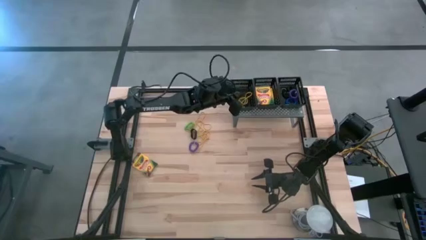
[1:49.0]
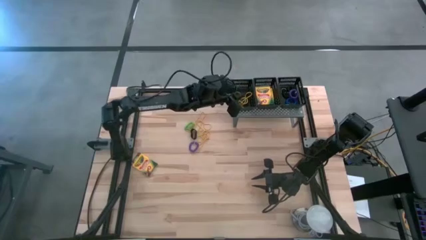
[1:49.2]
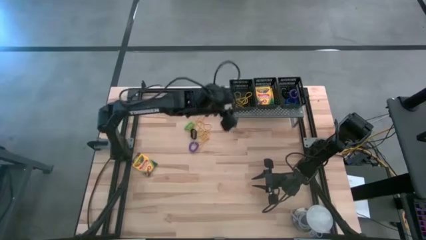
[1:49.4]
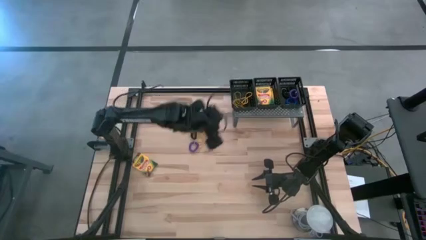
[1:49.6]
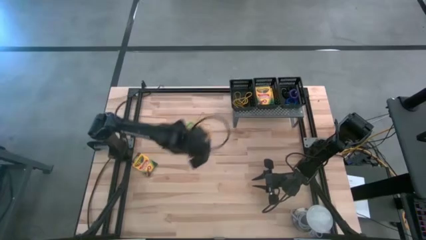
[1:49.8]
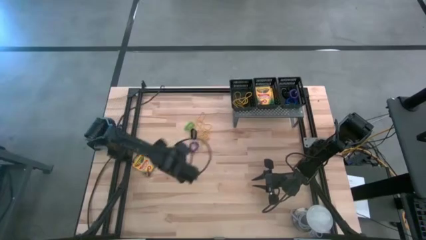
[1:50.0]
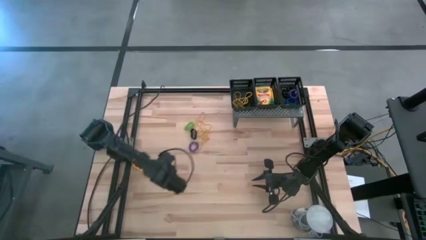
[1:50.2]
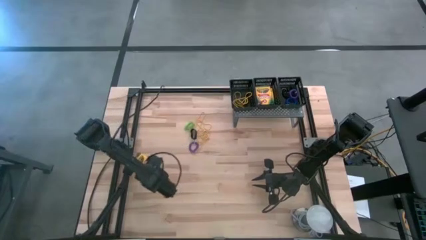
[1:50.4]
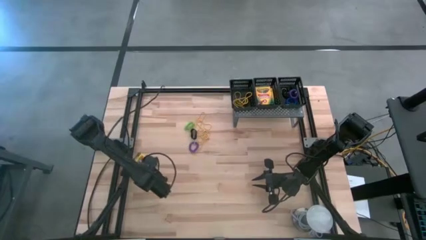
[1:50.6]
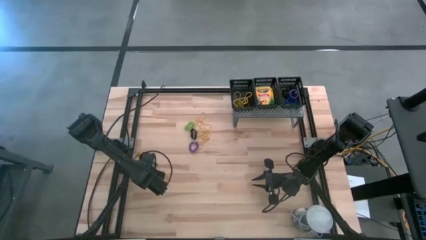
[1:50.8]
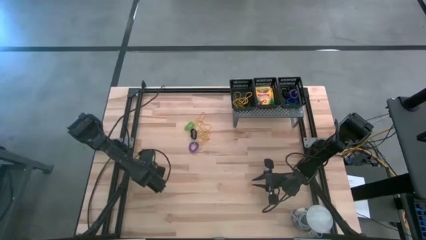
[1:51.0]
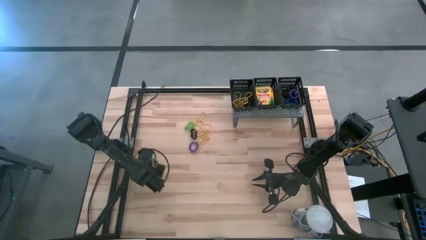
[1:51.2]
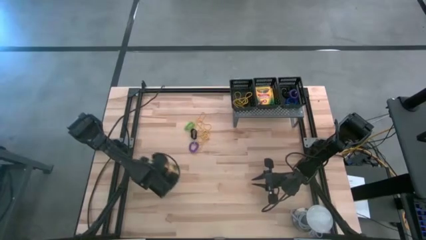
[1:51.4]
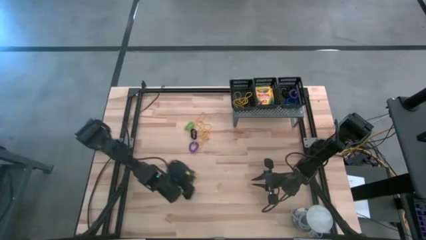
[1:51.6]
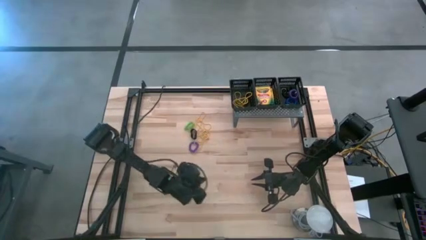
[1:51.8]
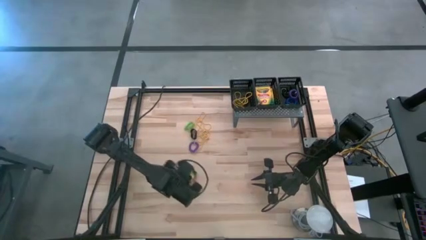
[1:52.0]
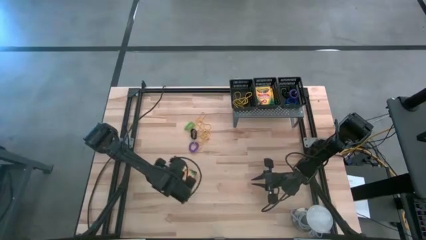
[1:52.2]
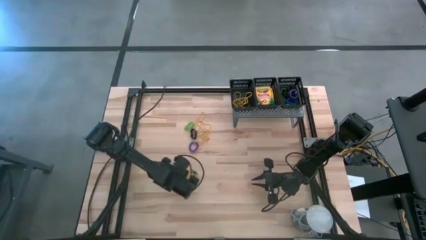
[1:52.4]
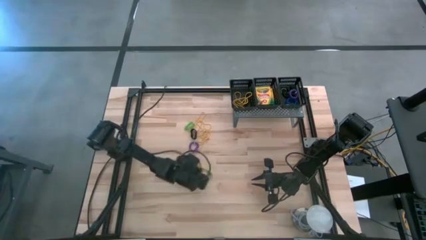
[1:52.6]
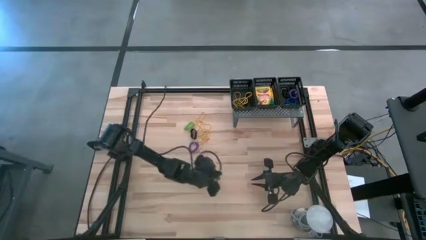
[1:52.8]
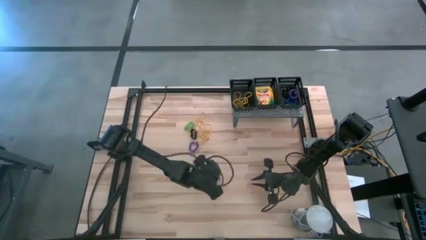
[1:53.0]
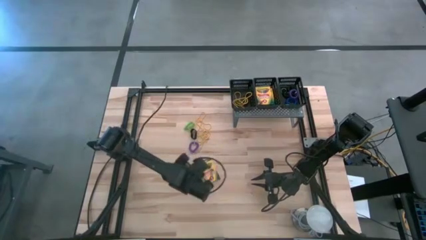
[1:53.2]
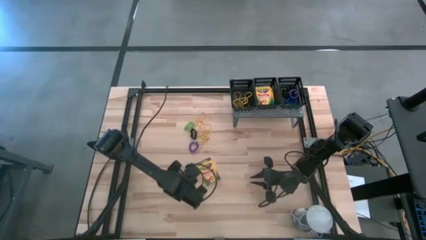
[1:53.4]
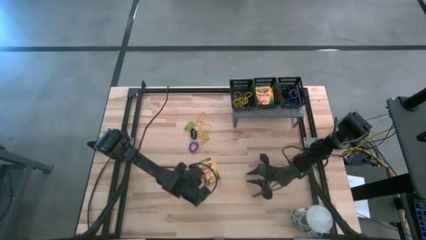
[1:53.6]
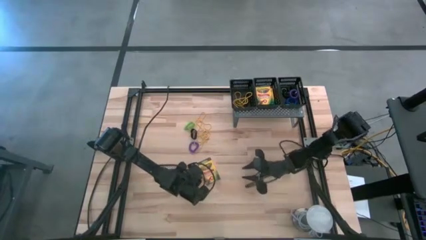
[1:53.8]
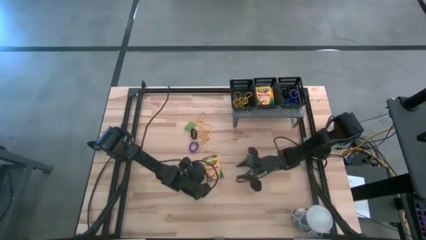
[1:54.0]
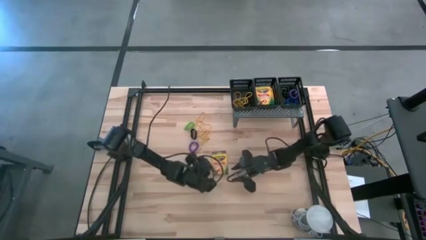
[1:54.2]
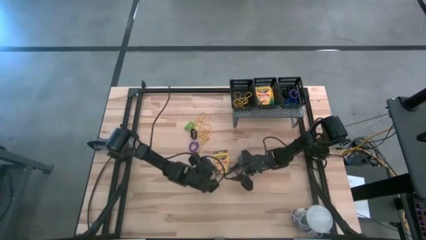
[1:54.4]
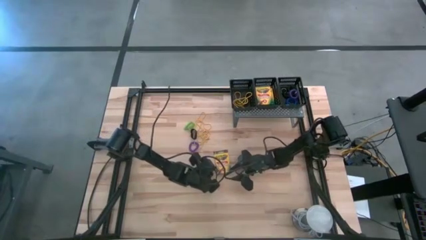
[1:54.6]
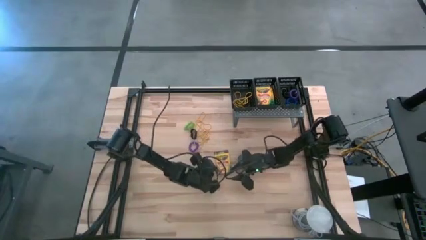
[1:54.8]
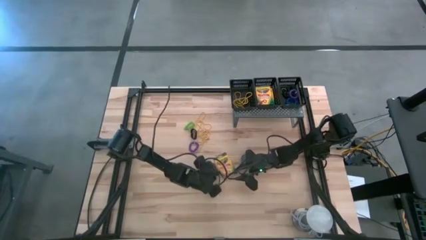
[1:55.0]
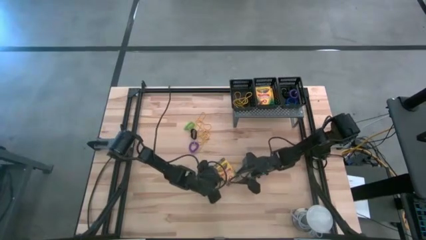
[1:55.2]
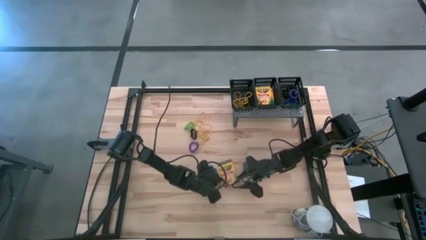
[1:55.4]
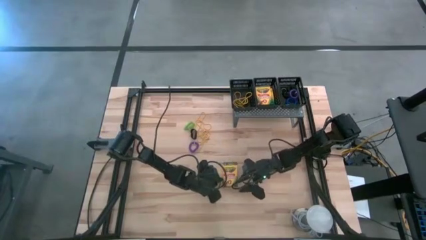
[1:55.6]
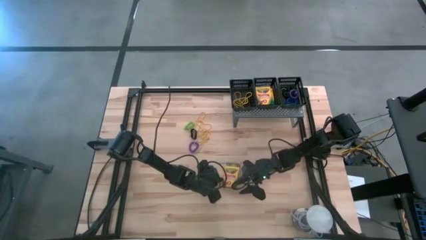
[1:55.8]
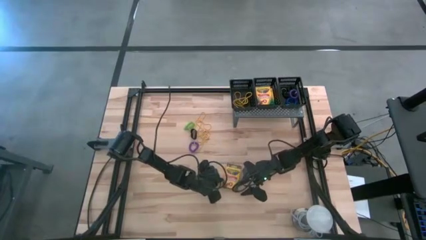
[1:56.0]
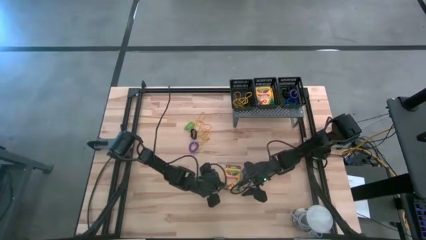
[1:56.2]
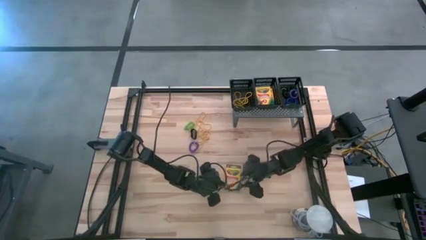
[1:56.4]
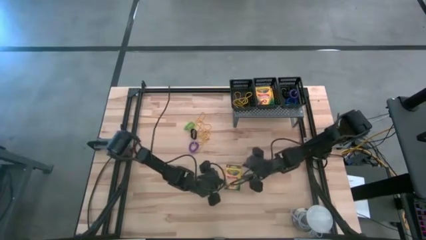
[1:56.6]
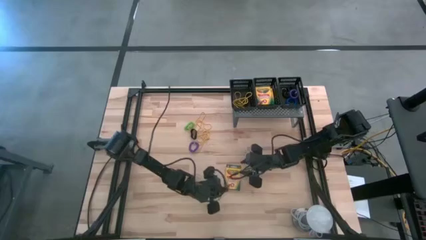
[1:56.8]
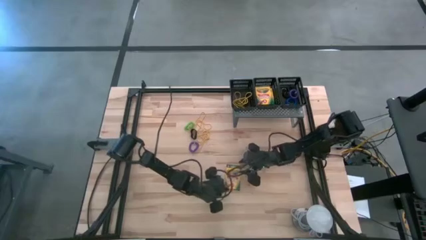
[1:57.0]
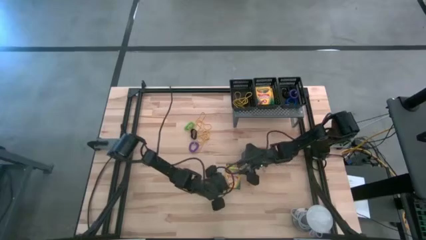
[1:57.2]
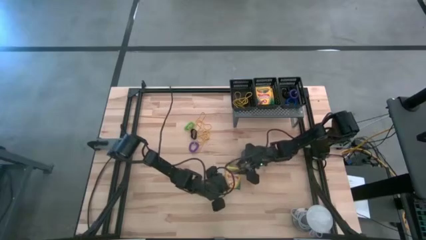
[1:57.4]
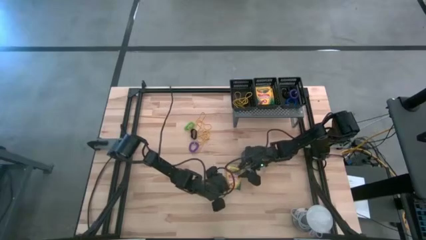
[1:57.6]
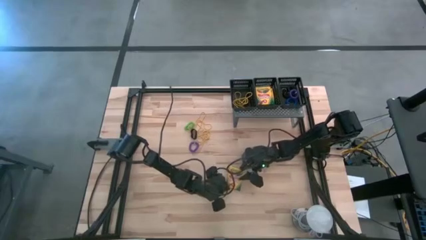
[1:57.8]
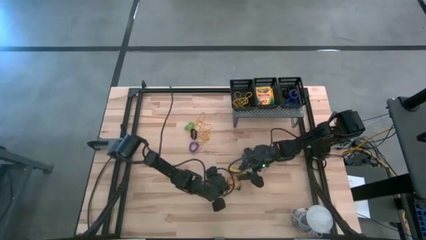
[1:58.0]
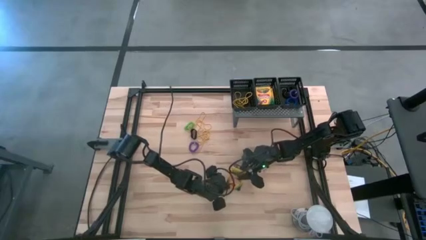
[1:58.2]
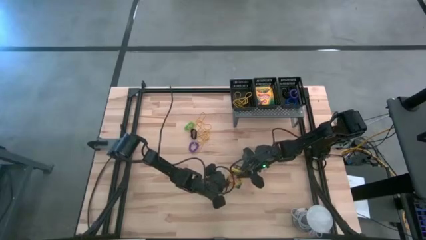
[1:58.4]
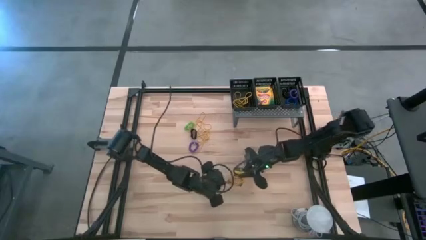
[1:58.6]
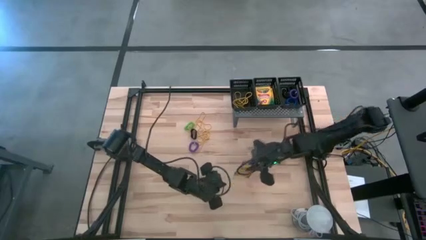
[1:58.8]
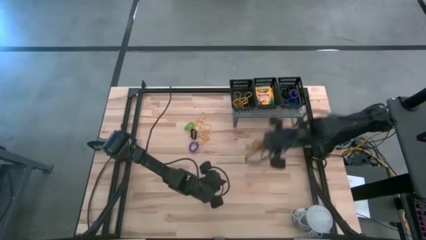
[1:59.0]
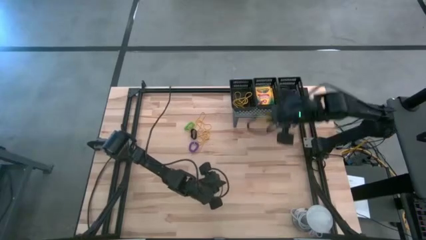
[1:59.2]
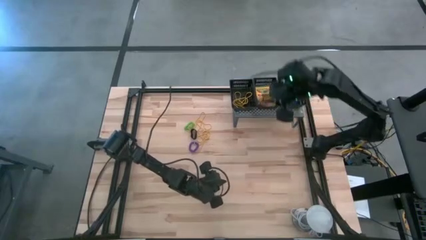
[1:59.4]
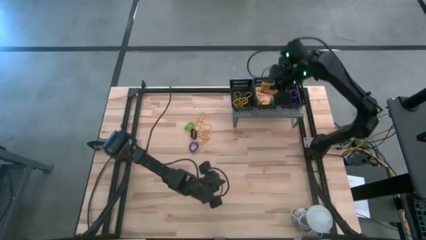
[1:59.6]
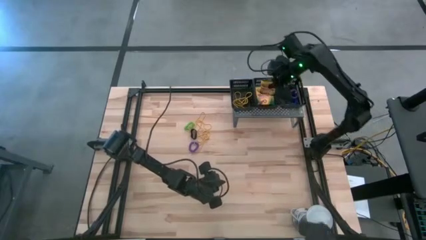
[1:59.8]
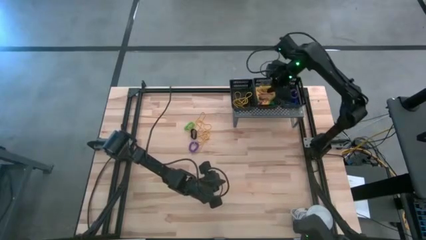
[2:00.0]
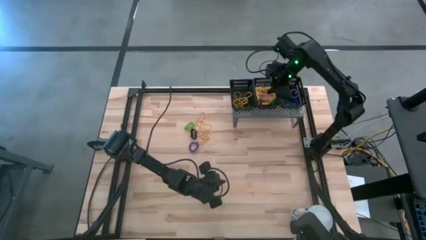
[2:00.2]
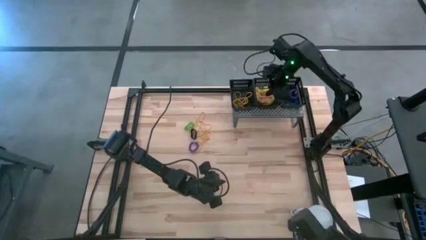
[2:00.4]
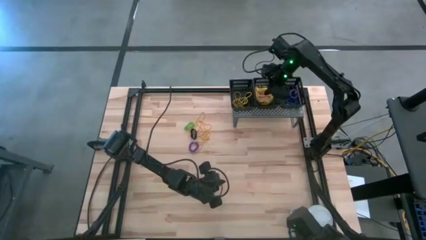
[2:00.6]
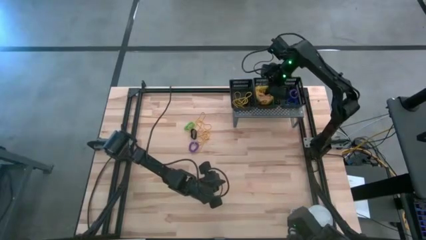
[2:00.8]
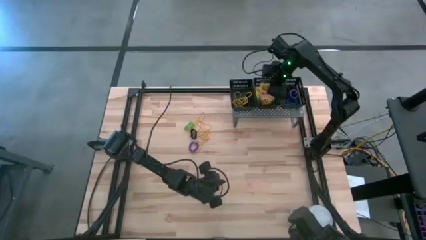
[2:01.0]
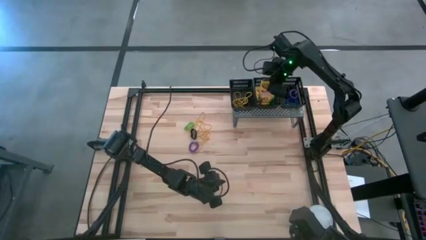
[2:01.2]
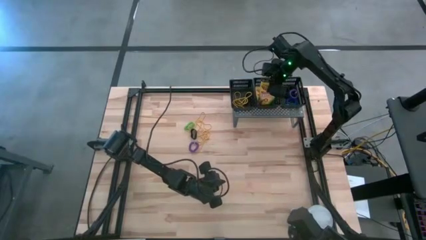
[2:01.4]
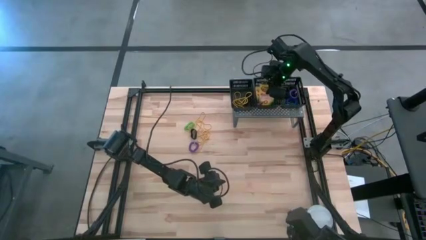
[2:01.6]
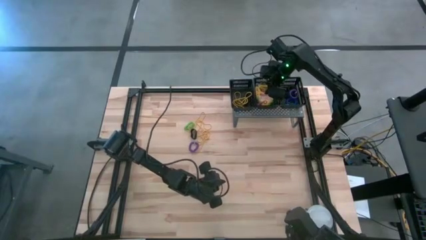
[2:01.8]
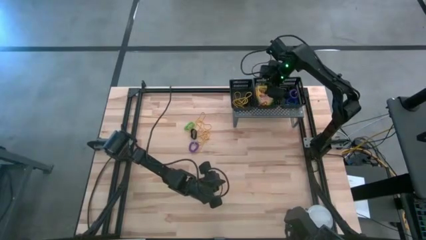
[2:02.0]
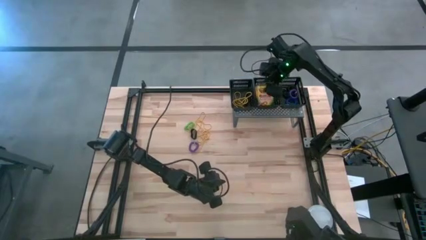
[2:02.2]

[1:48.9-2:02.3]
Task: Pick & Place Office Desk Supplies
Put the yellow crayon box into the middle black basket on the shelf

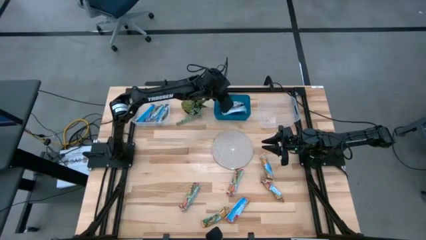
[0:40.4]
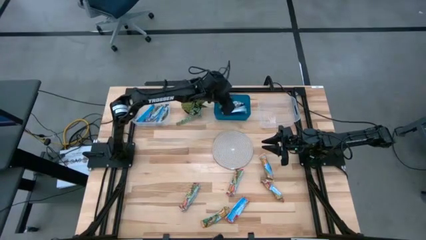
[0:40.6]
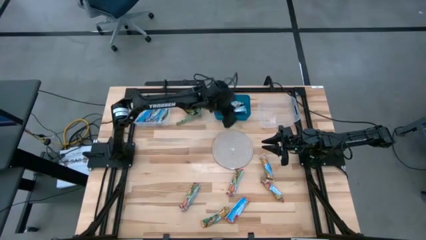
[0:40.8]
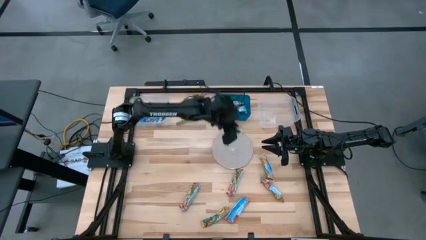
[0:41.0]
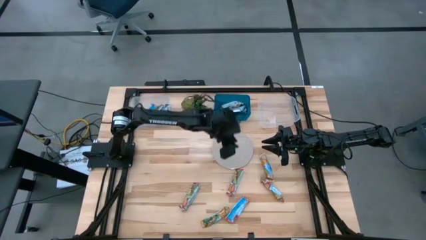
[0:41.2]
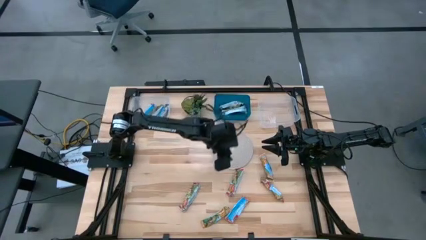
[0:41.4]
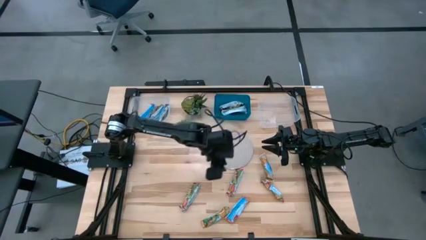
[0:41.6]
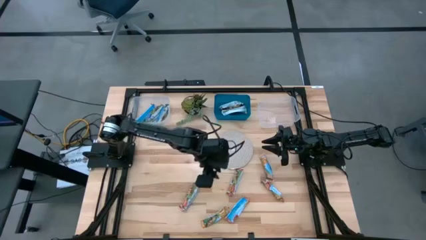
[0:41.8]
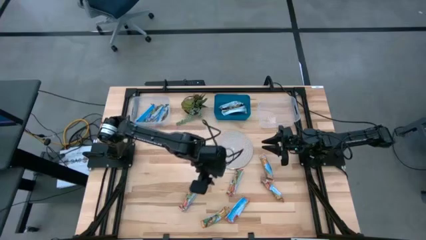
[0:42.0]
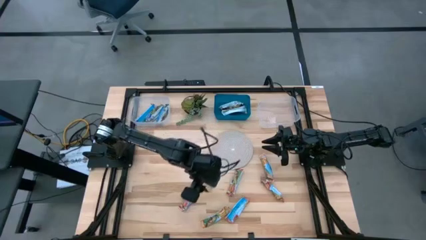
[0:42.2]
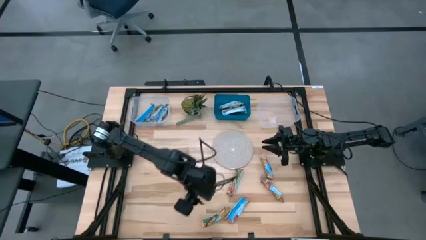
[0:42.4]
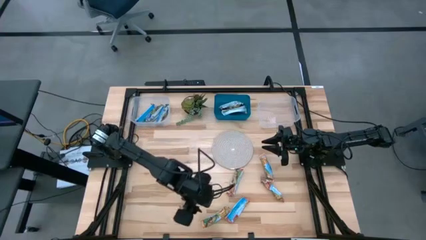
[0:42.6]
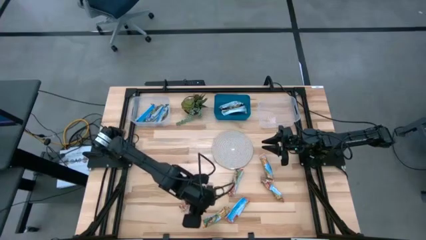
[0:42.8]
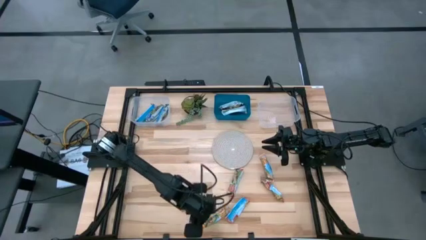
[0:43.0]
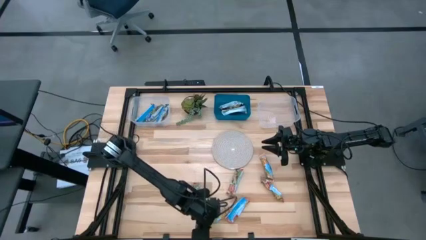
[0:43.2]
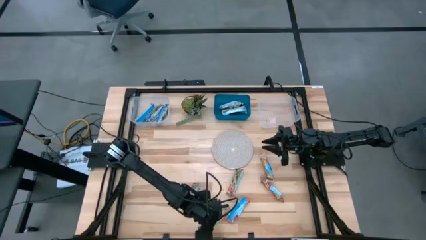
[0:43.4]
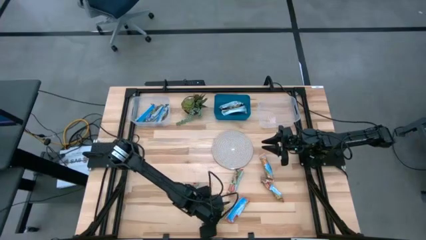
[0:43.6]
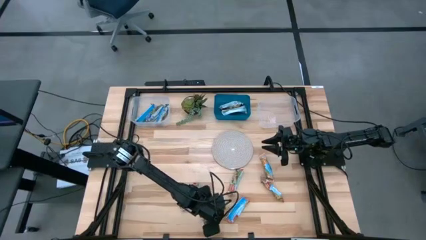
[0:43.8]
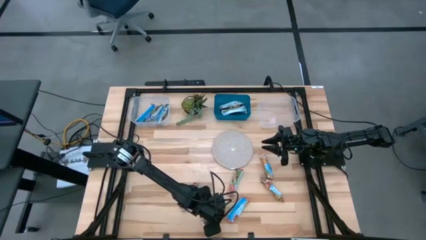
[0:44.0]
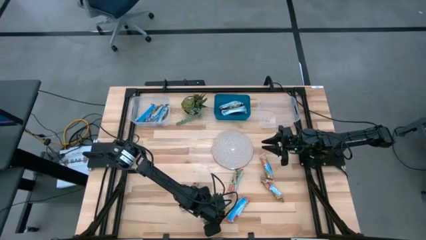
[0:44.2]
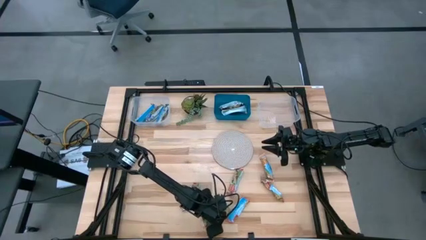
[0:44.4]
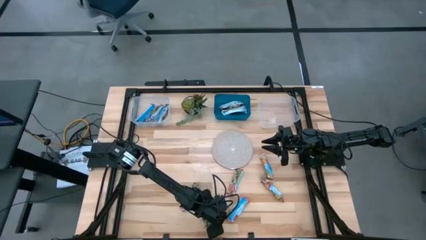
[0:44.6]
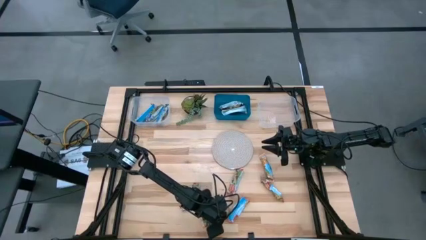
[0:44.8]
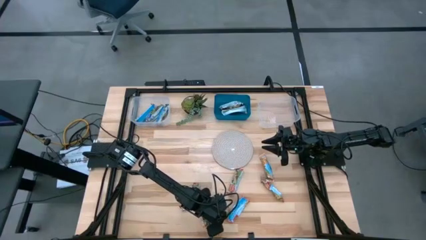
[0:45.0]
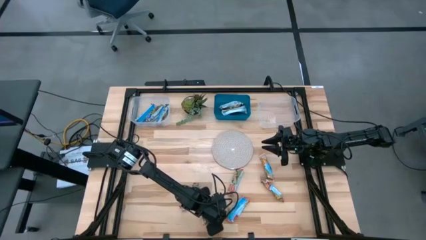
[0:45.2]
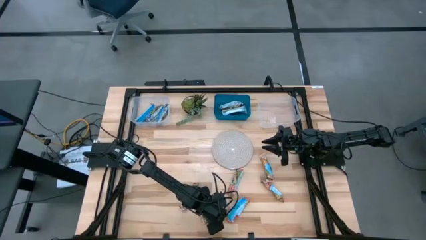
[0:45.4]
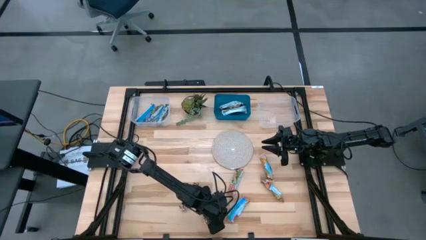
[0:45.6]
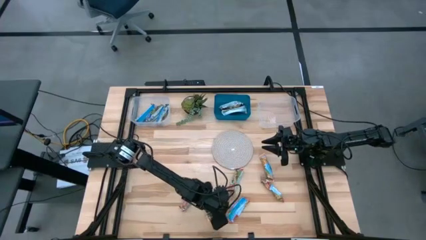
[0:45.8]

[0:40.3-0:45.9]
Task: Pick and place Granola Bars by type
Put the yellow granola bar into the blue bin
